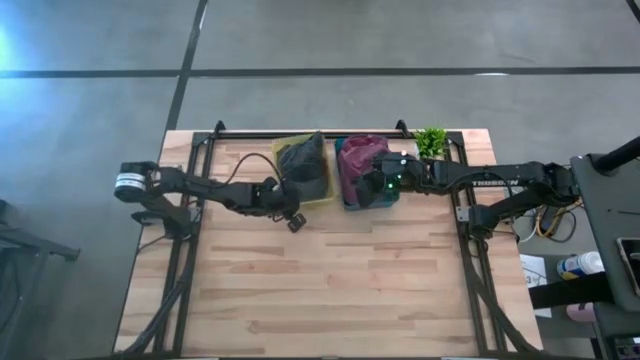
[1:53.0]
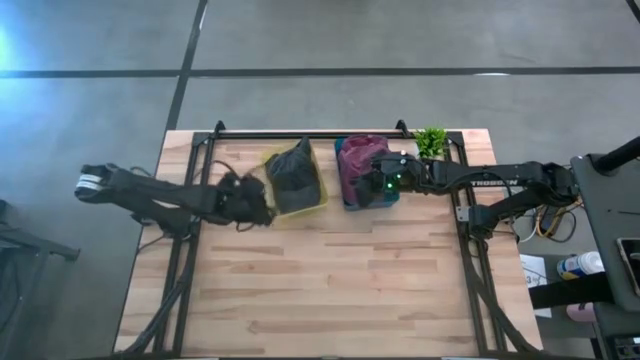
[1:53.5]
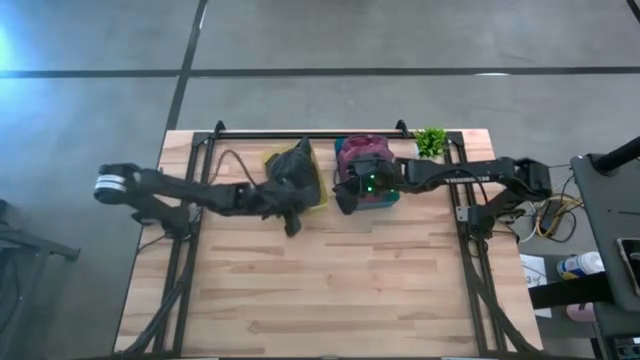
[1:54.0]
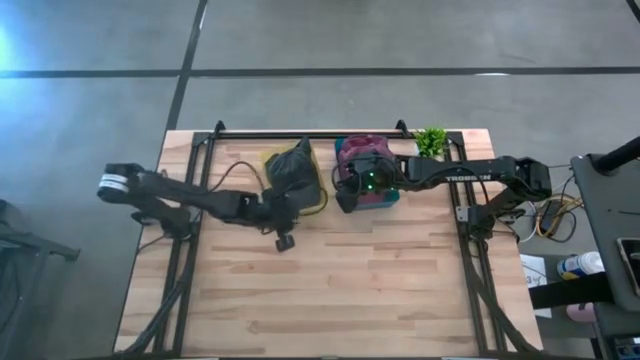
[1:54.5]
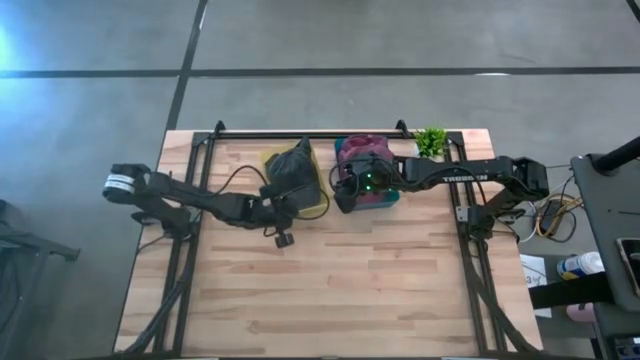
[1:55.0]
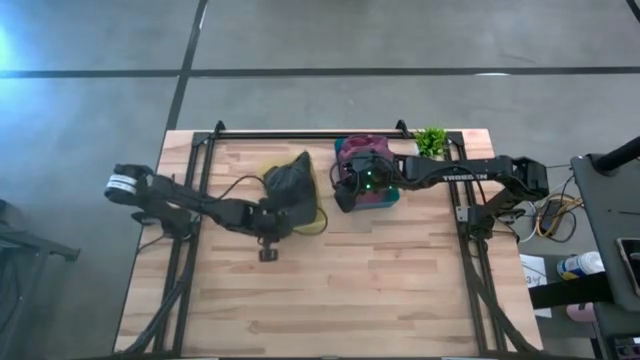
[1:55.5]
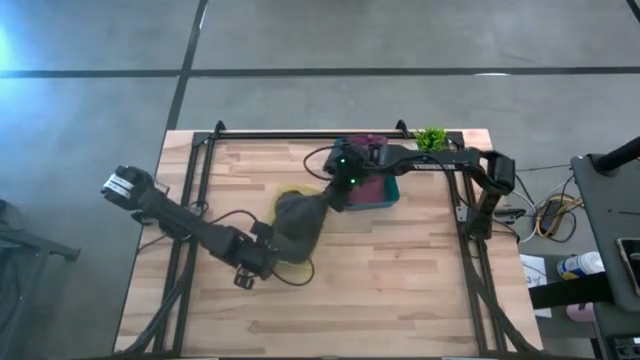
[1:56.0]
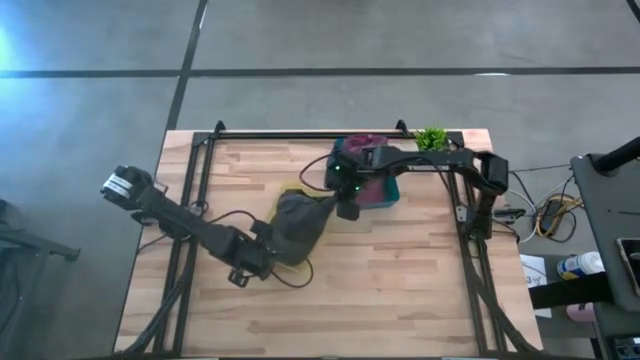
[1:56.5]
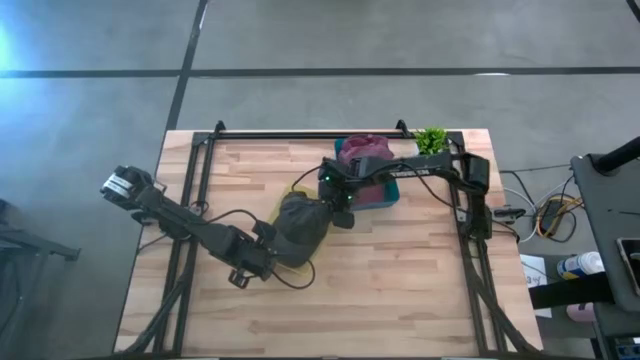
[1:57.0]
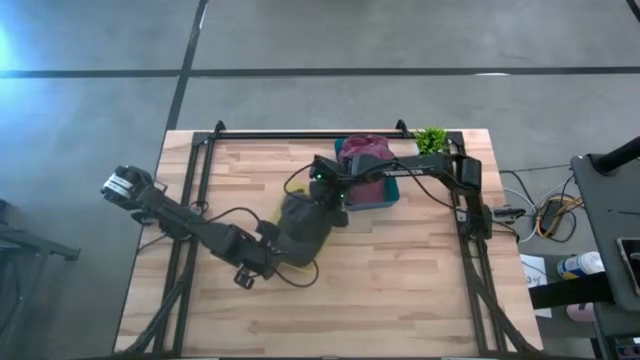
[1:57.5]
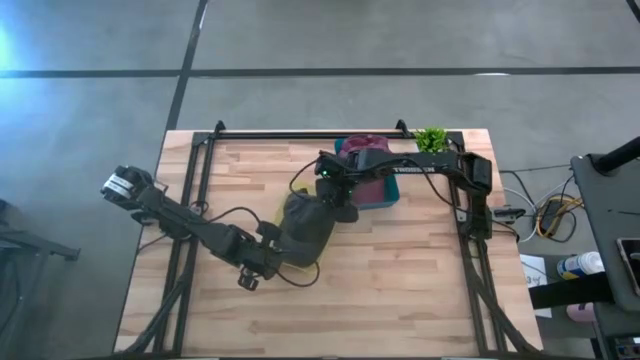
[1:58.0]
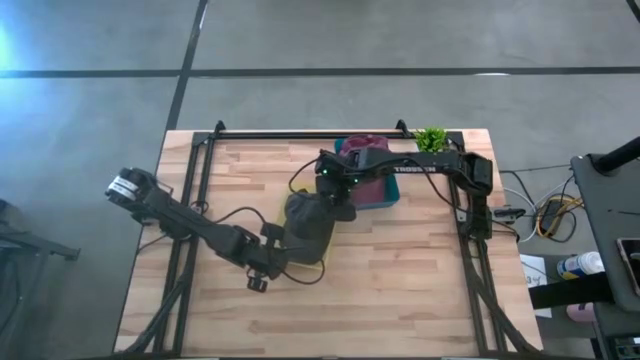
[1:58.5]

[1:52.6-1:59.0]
Task: Sort caps
Adjust the black caps in the yellow bin

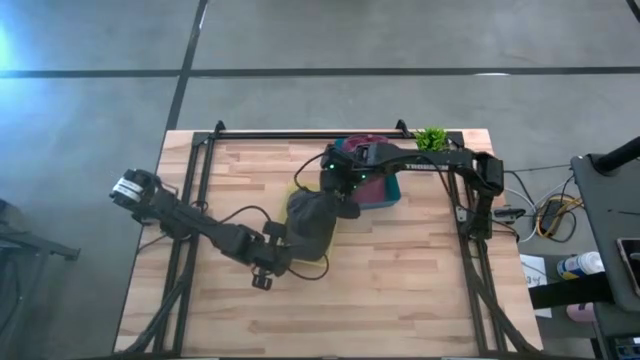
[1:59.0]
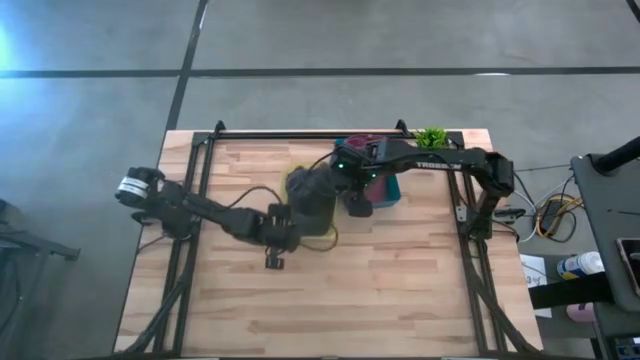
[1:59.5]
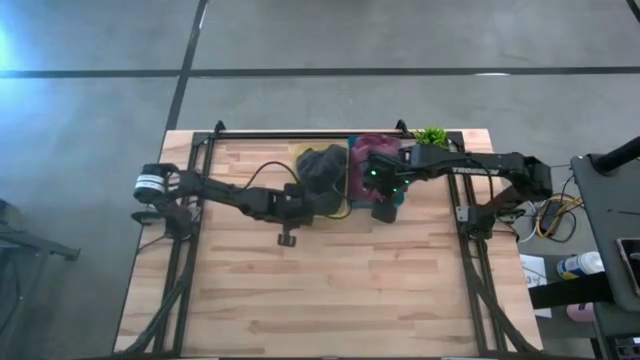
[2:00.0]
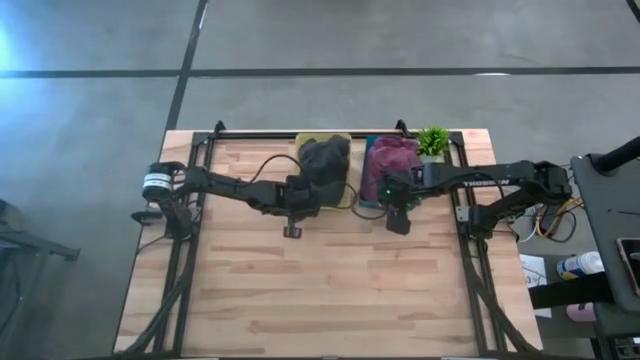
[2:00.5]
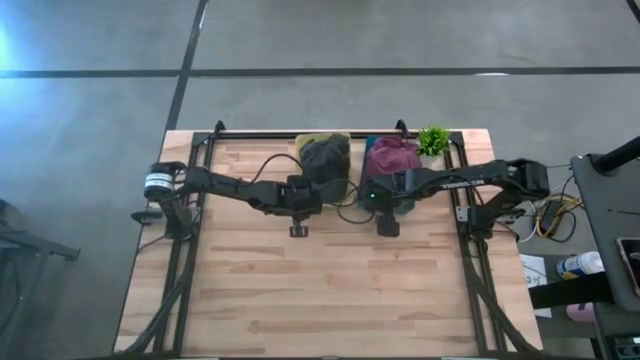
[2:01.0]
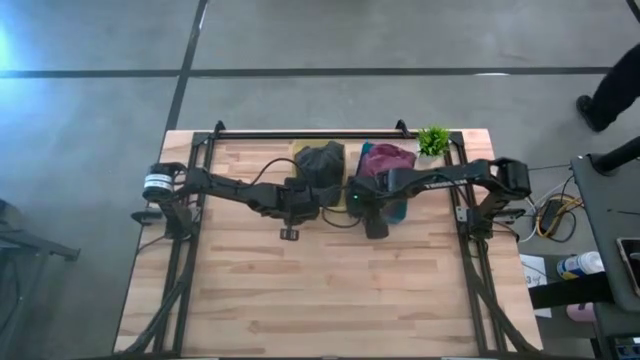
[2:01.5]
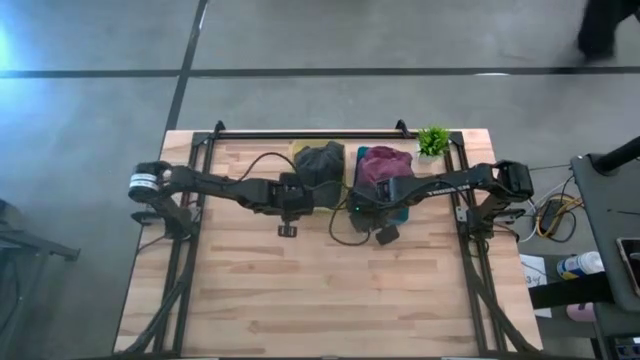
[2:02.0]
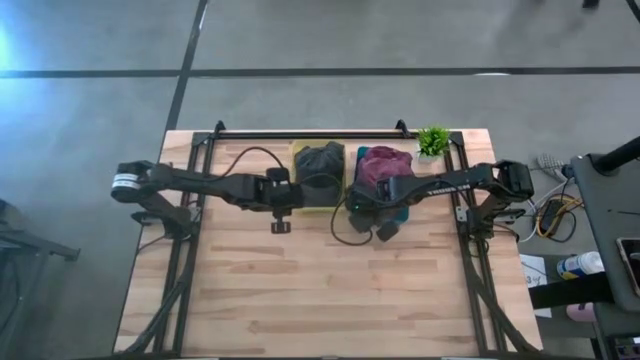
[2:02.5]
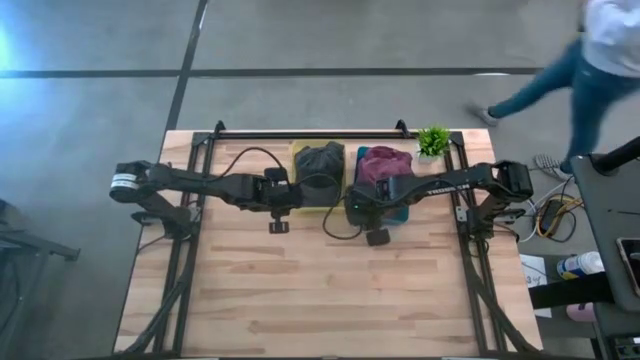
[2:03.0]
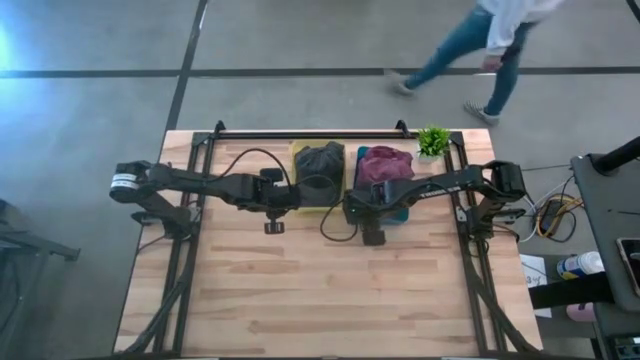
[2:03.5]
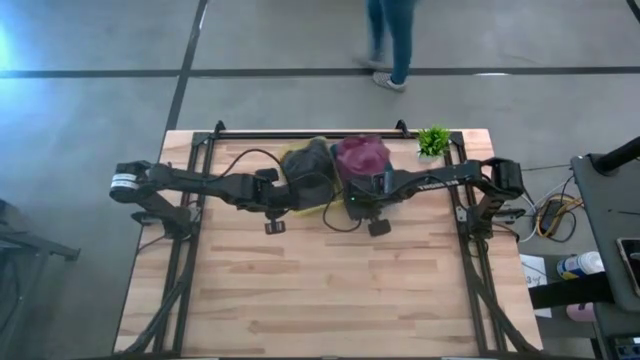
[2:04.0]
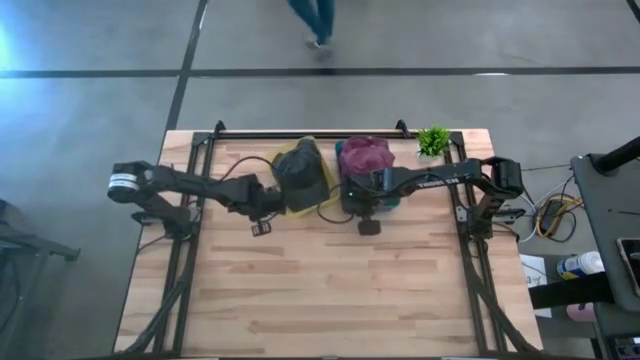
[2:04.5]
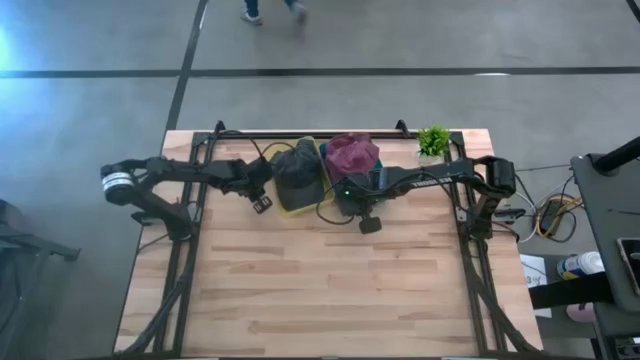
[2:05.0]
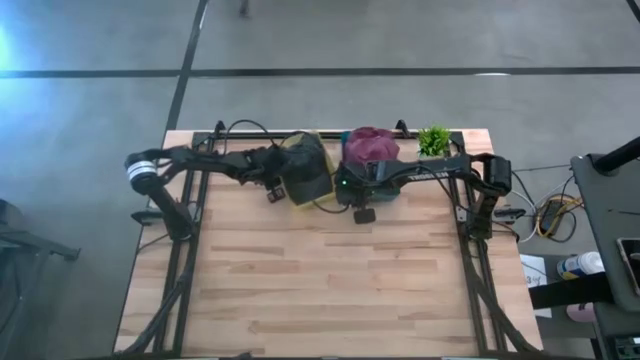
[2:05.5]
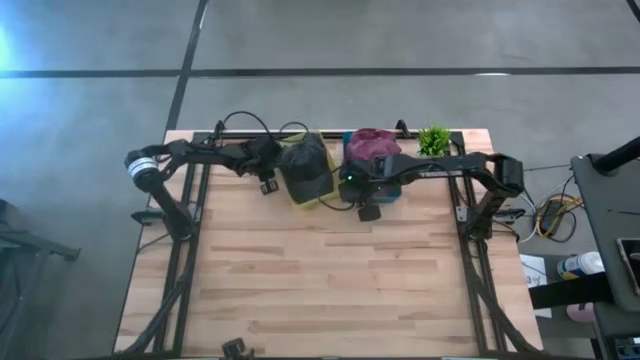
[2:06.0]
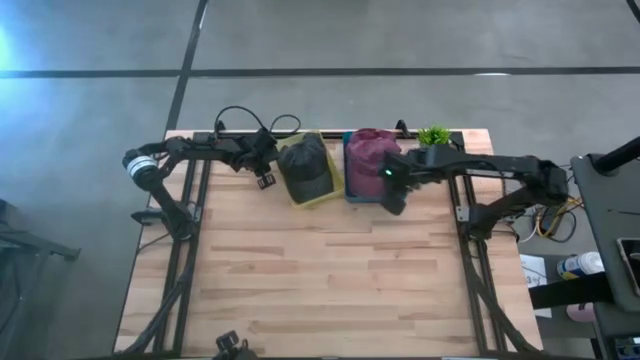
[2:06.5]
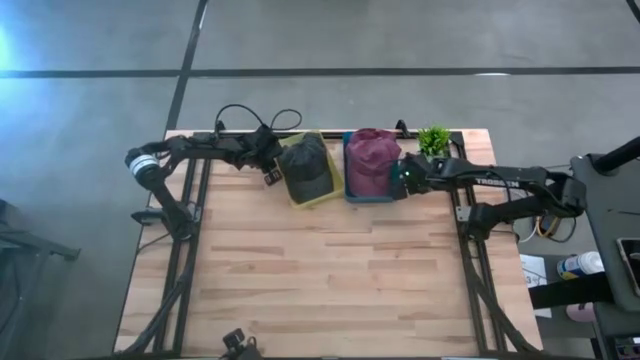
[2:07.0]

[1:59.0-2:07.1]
Adjust the bins

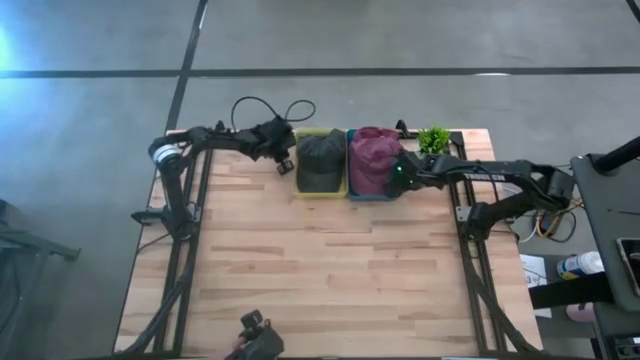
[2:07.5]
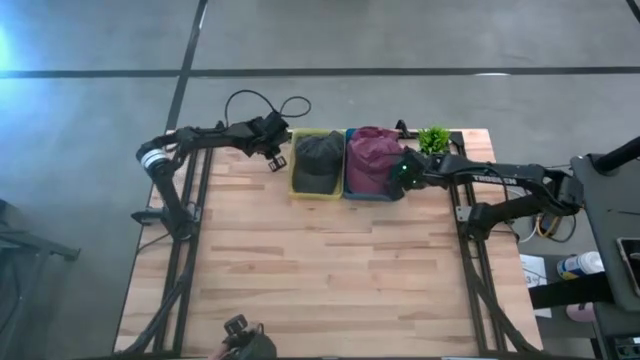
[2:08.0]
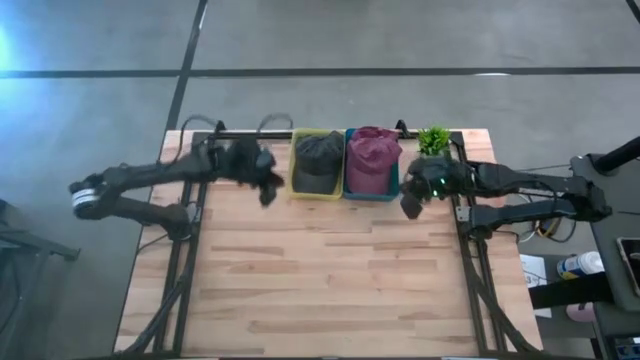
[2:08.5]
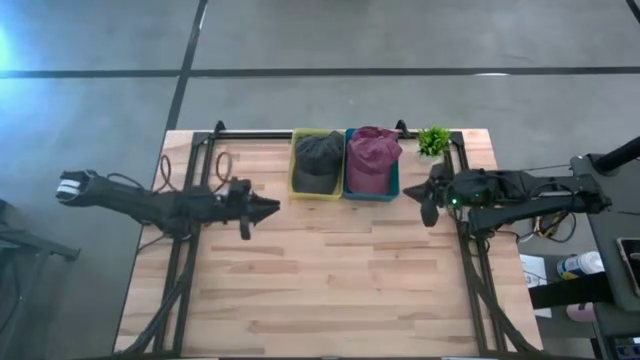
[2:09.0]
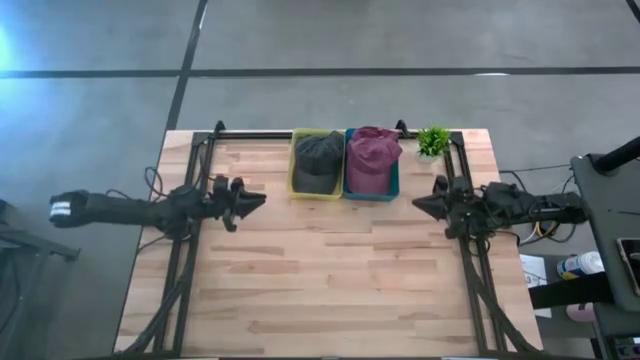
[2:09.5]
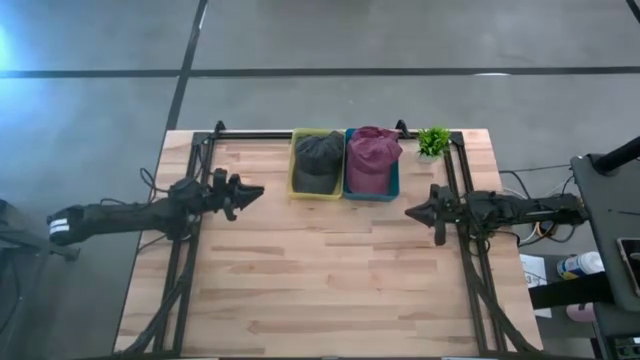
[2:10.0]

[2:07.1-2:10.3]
Return to Home Position
